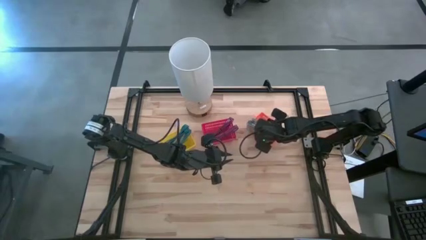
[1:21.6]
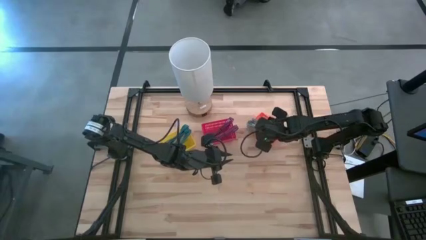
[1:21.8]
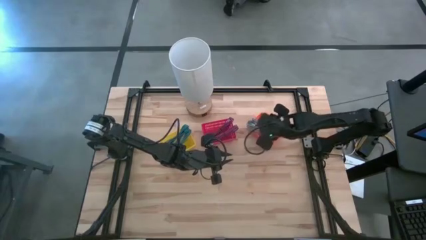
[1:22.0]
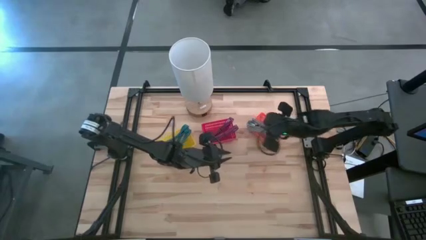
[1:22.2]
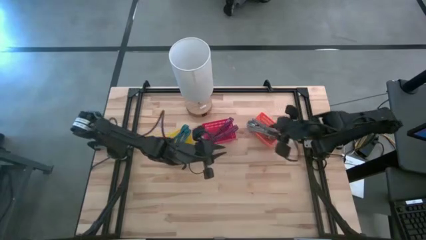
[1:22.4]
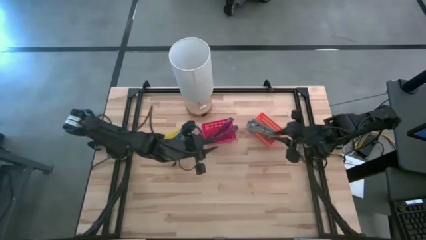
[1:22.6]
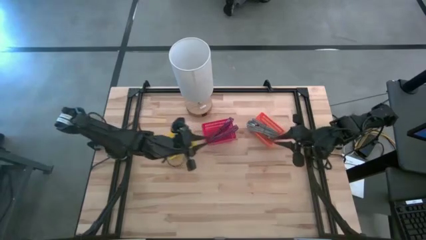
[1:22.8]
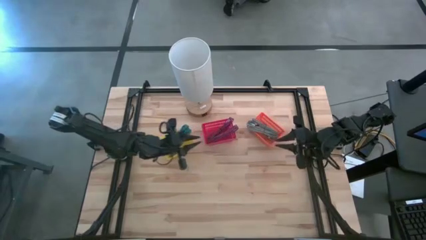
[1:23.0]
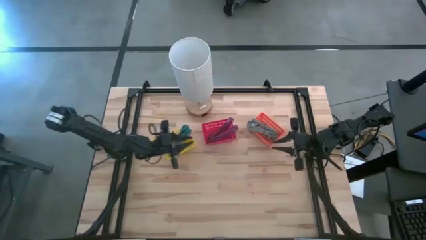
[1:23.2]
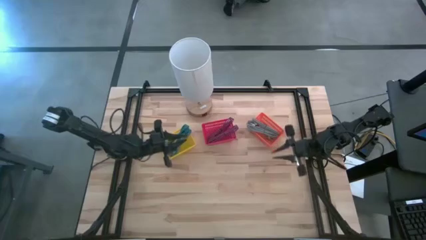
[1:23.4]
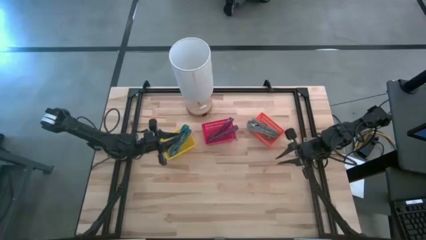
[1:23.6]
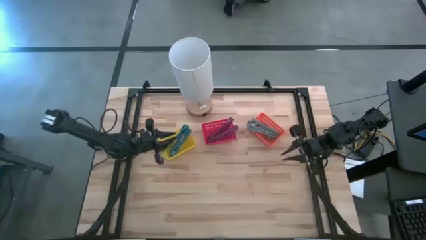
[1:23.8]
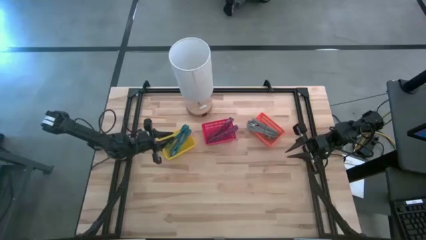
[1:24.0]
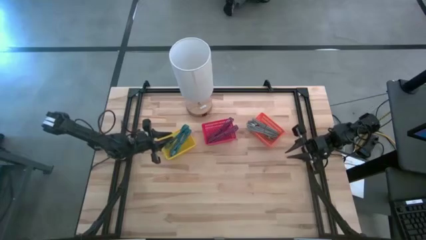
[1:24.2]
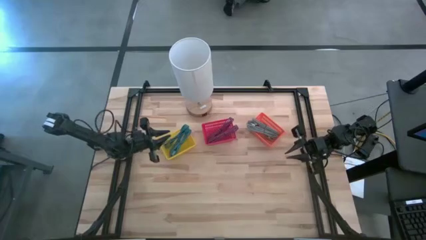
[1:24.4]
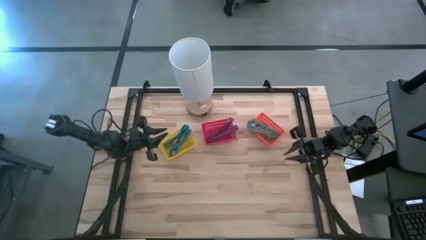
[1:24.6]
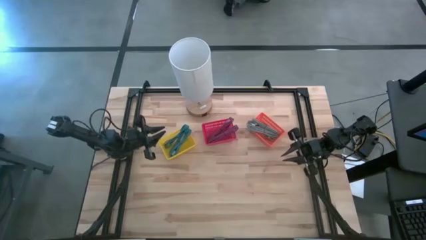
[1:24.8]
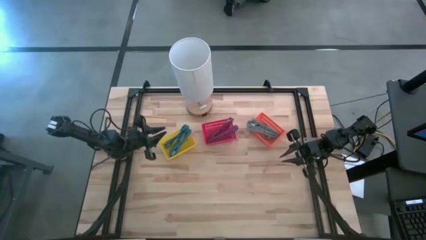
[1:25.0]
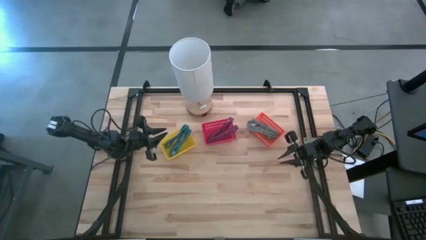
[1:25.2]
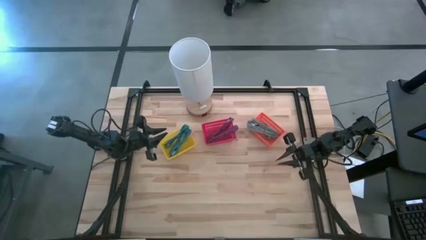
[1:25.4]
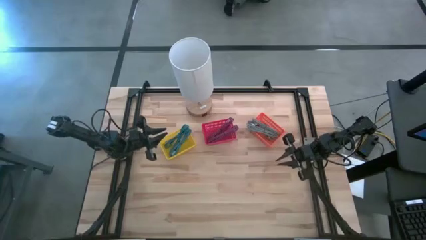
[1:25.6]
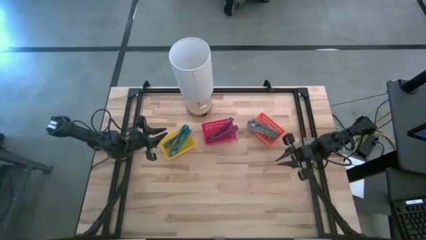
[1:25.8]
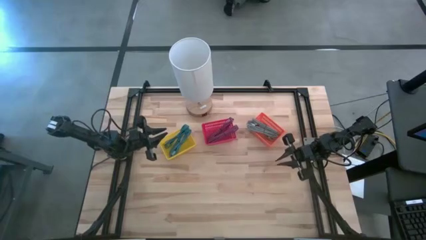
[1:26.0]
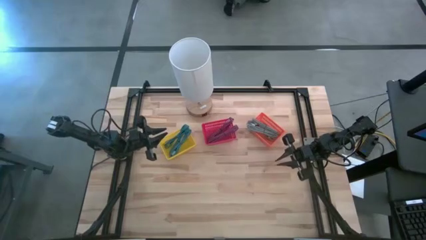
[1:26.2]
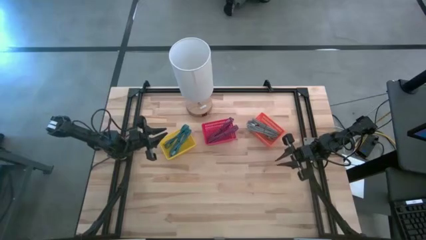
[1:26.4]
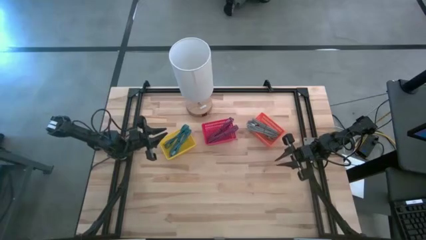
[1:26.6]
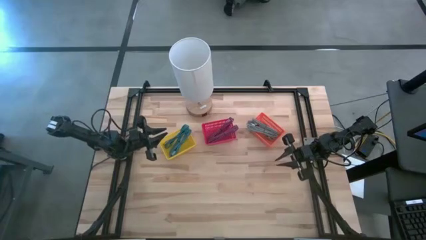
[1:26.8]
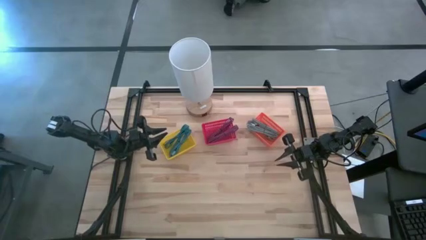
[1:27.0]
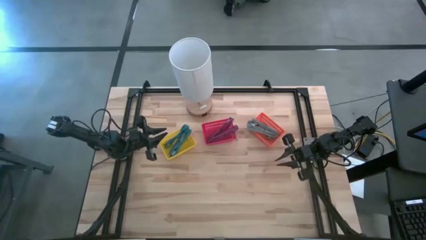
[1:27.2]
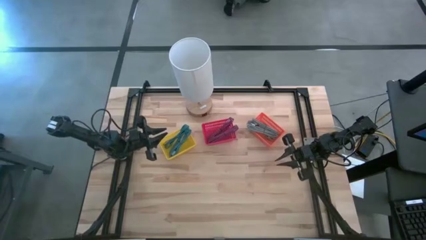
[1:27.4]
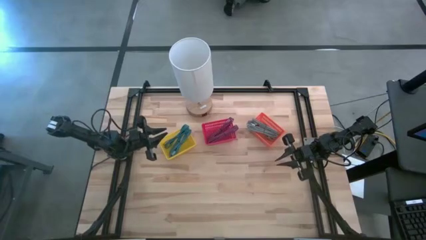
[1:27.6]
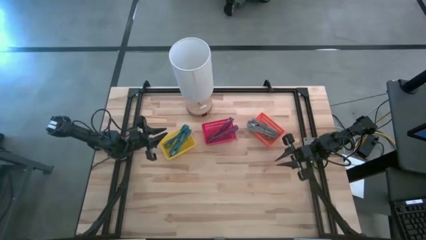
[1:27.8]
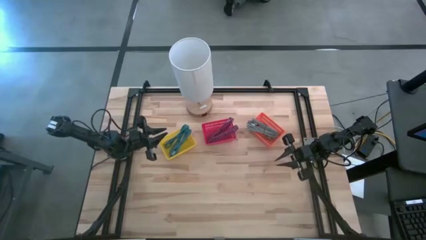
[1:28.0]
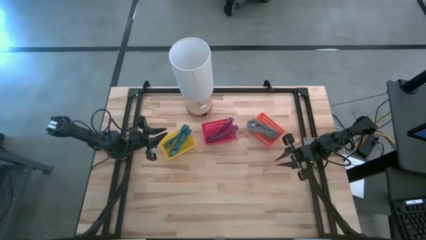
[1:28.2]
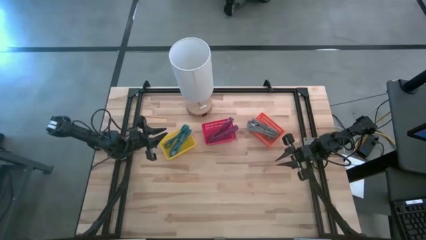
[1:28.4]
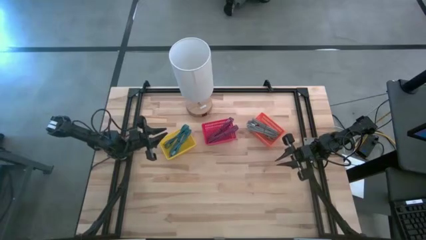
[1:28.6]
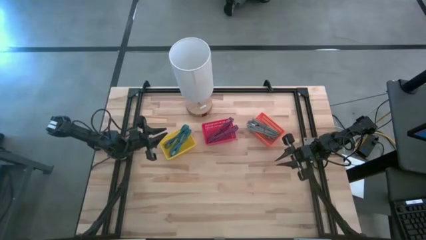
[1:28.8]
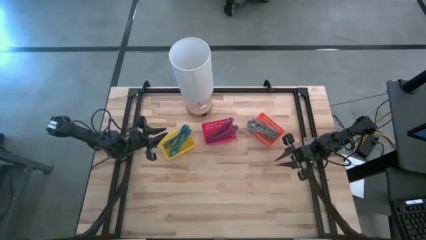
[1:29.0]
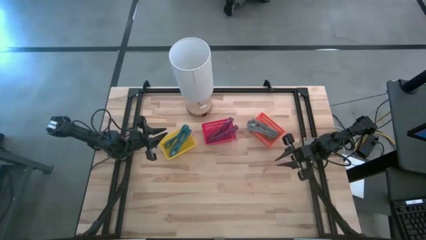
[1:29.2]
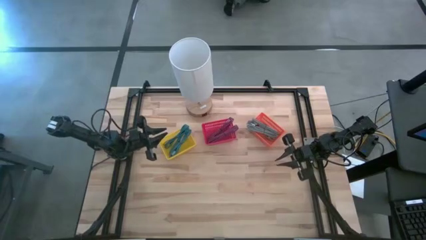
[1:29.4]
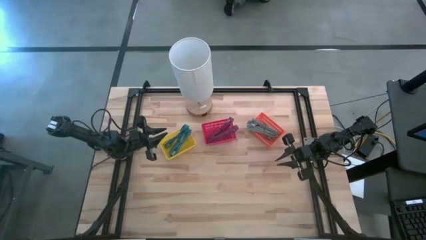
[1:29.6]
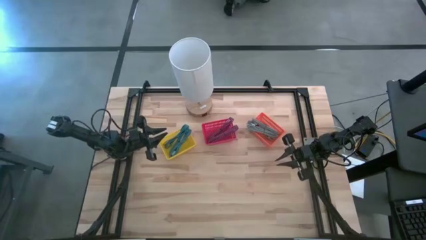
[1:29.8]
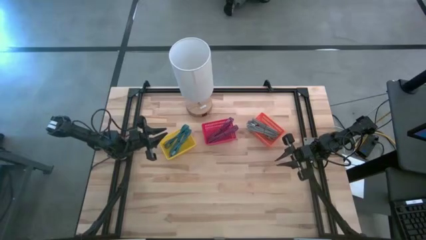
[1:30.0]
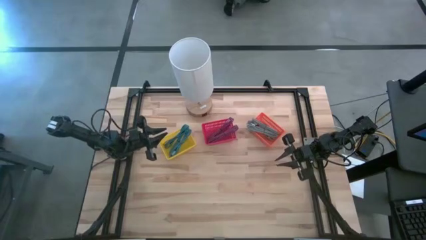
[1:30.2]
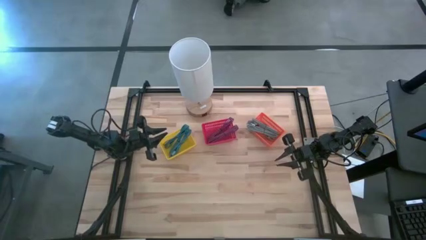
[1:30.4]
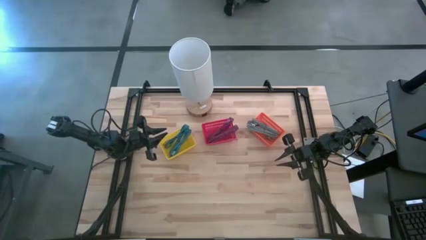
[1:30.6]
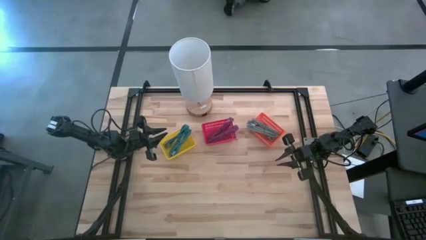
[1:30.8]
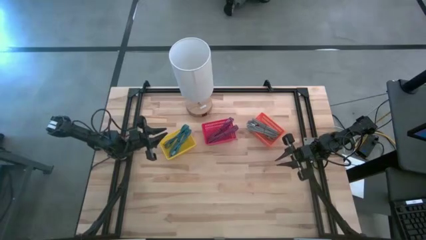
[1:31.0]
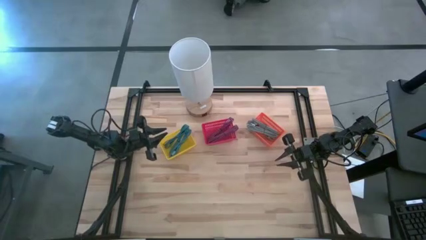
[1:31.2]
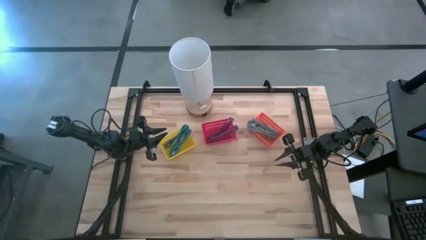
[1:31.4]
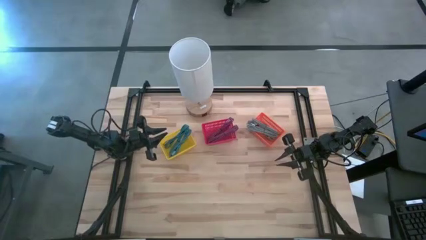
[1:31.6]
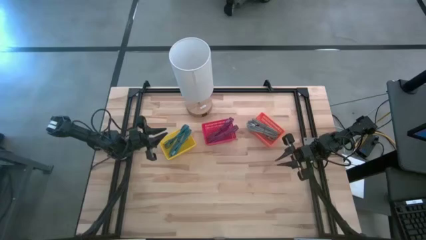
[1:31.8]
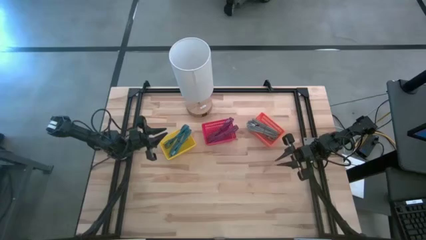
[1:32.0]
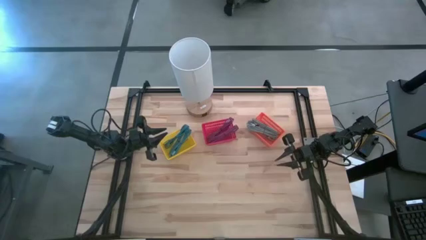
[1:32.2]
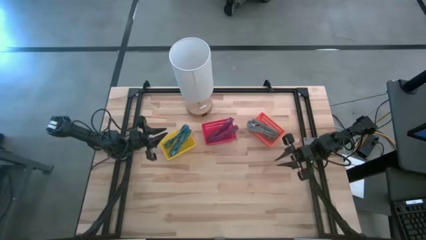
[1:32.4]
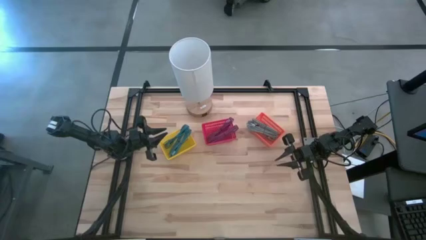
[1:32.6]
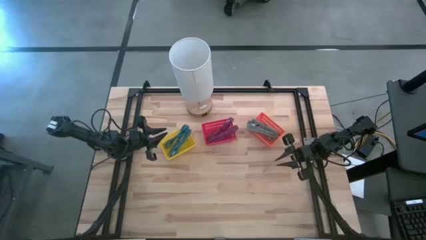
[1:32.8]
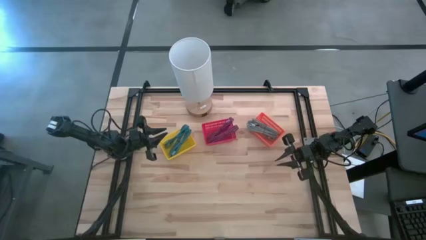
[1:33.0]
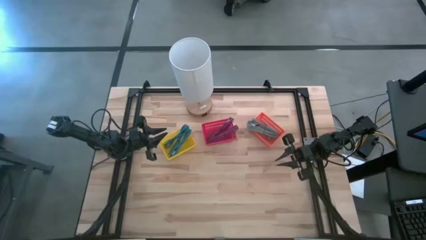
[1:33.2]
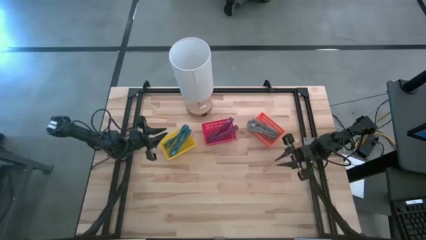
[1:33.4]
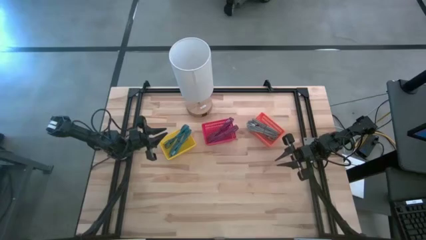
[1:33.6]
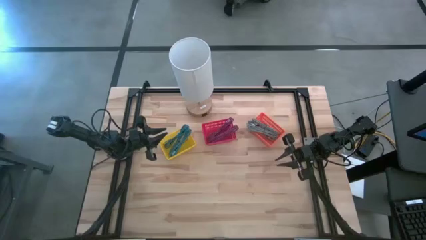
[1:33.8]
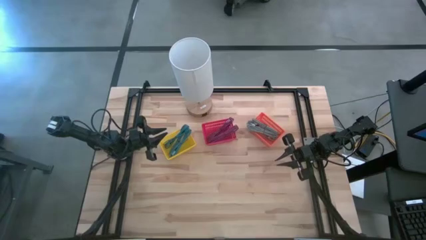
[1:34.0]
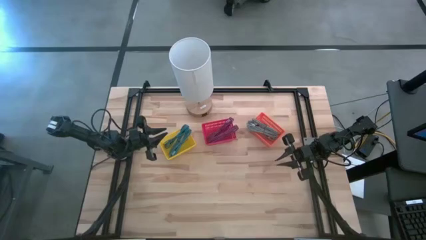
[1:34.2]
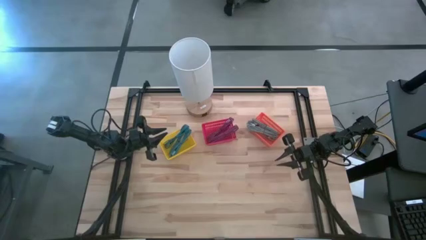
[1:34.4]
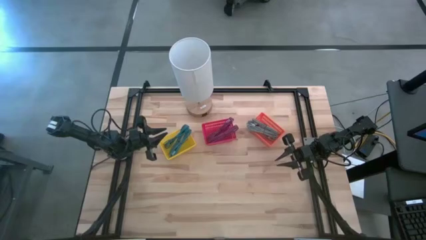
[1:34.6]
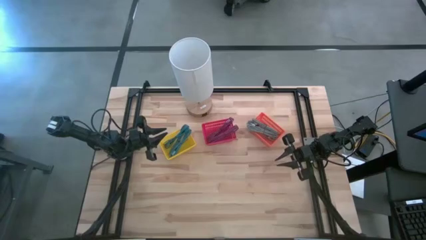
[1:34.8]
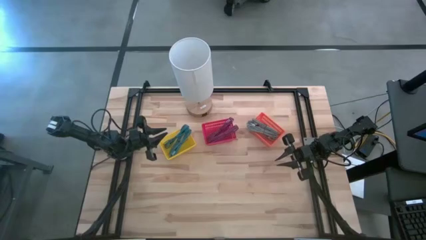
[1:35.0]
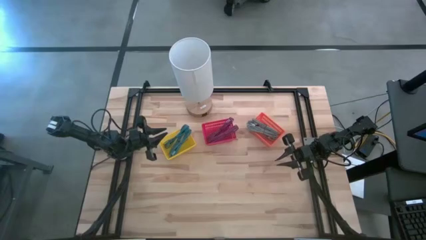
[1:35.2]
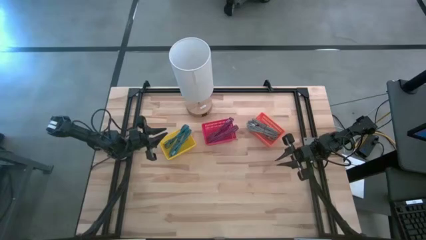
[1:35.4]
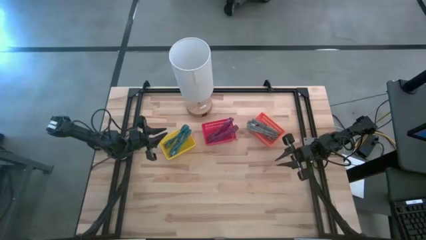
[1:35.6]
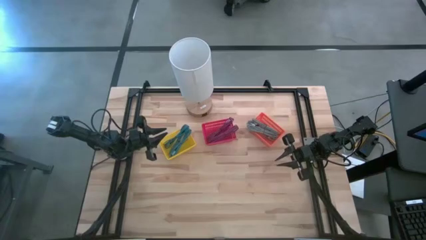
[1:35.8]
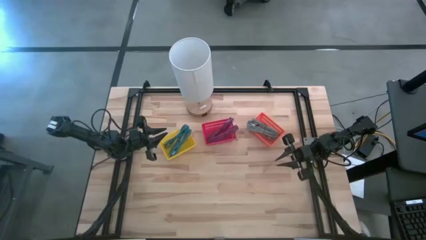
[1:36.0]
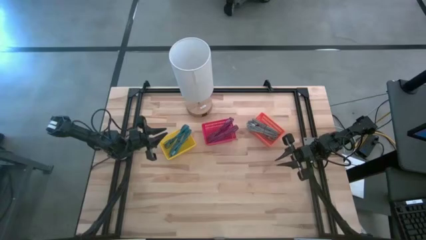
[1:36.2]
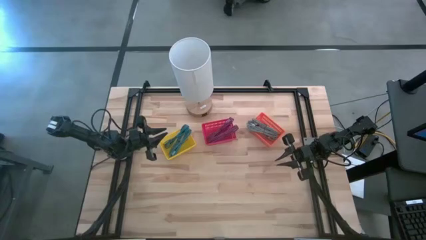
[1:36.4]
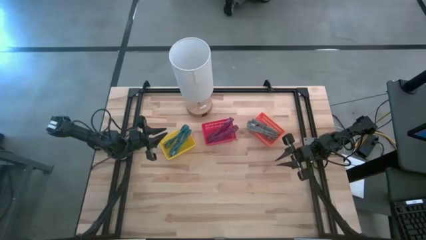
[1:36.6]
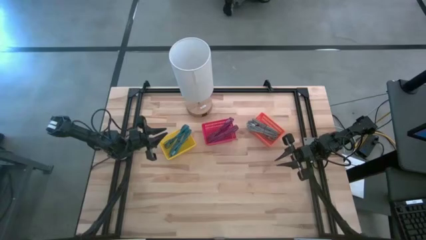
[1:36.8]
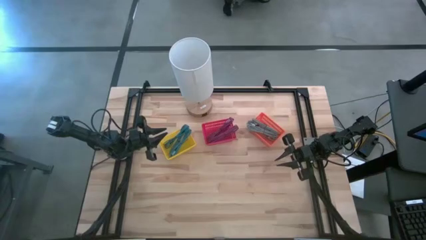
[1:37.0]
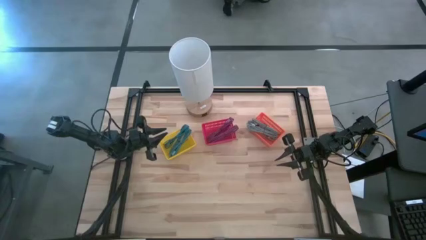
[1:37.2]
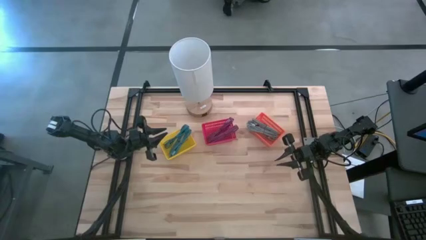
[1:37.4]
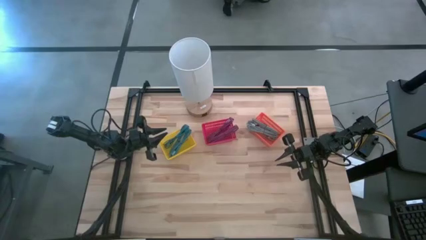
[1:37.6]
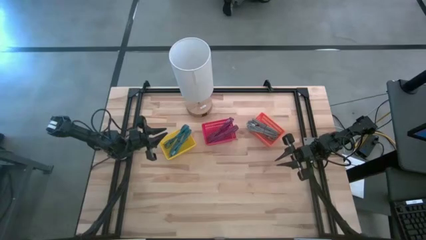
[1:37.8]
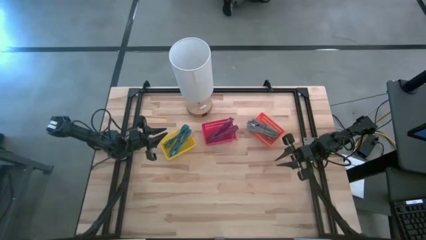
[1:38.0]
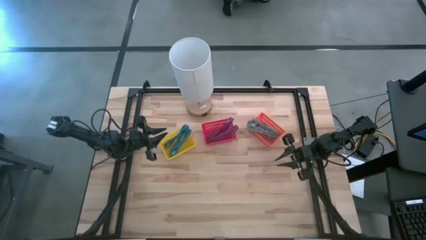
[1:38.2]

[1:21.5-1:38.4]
Task: Pick & Place USB Port
Return to Home Position
